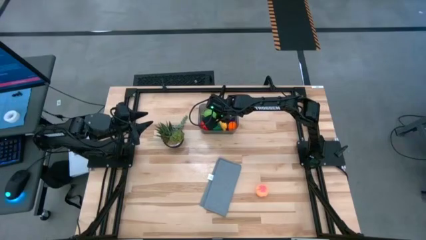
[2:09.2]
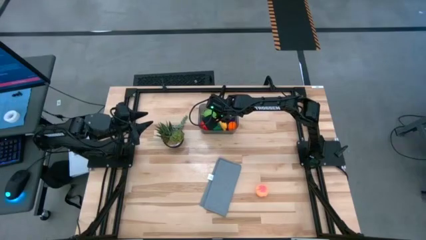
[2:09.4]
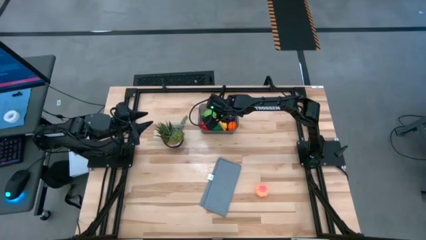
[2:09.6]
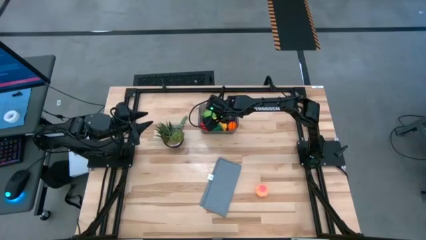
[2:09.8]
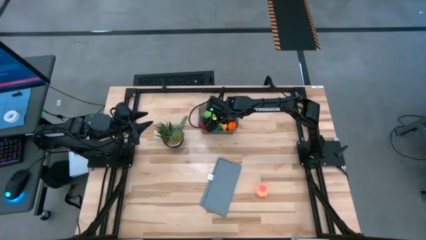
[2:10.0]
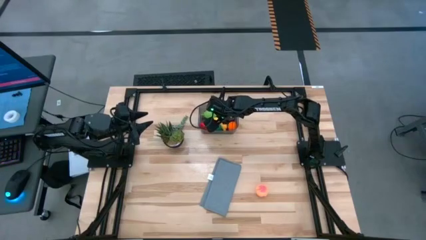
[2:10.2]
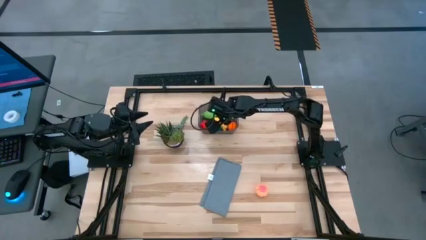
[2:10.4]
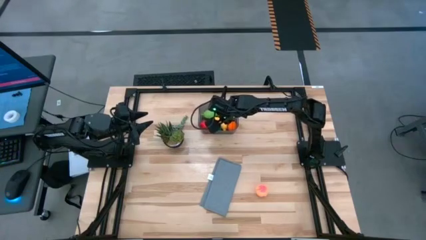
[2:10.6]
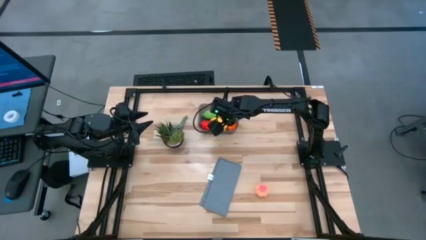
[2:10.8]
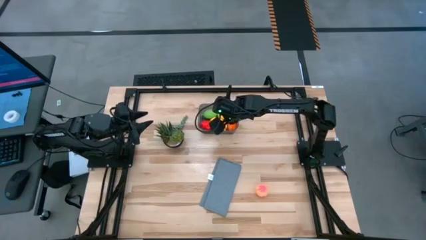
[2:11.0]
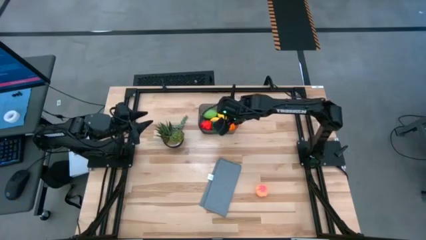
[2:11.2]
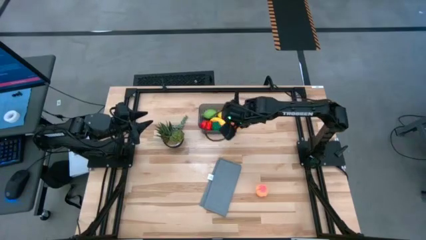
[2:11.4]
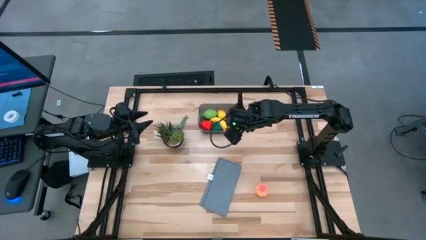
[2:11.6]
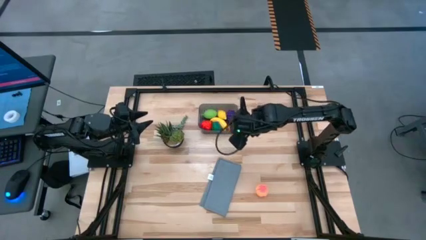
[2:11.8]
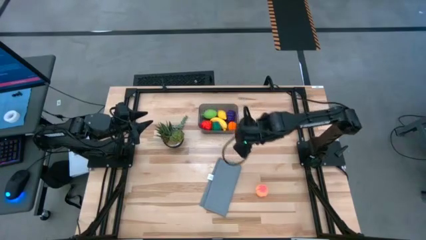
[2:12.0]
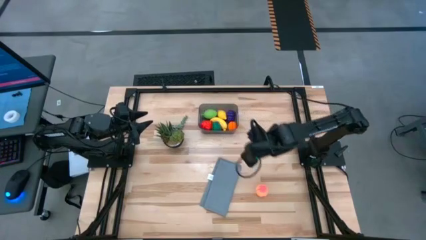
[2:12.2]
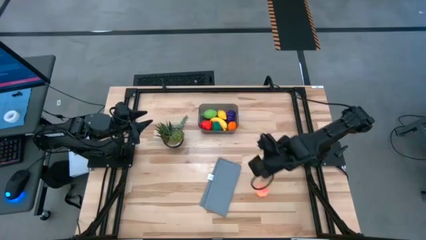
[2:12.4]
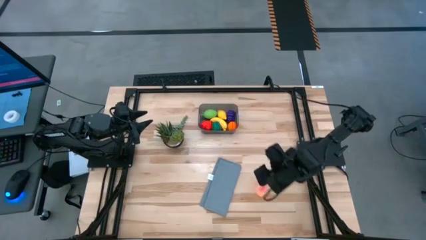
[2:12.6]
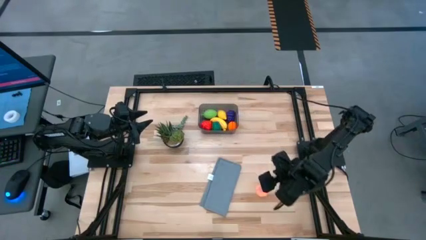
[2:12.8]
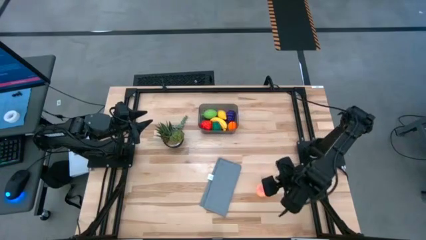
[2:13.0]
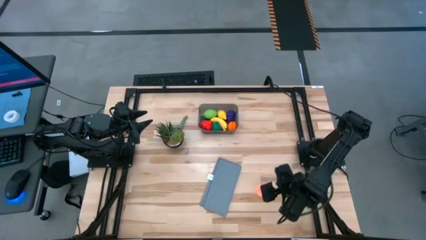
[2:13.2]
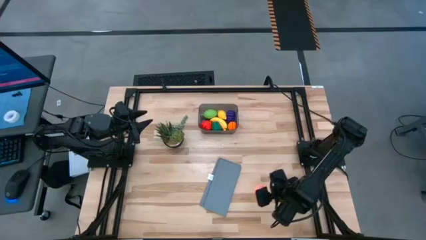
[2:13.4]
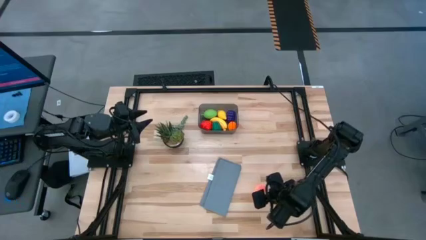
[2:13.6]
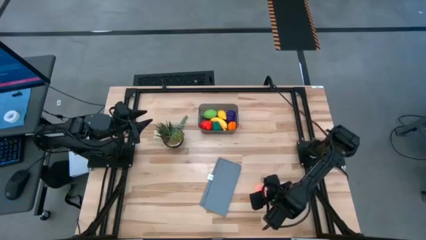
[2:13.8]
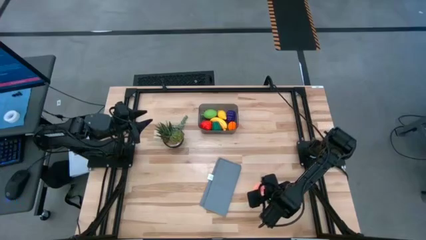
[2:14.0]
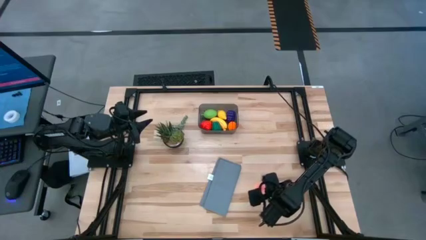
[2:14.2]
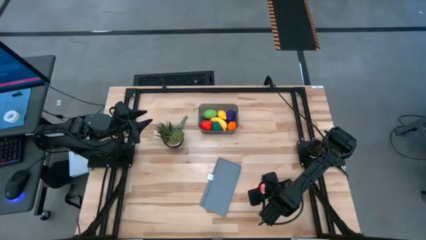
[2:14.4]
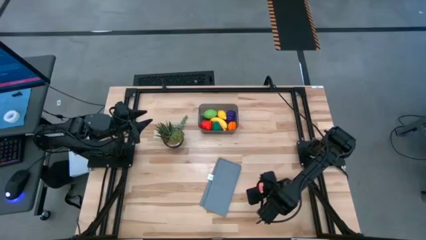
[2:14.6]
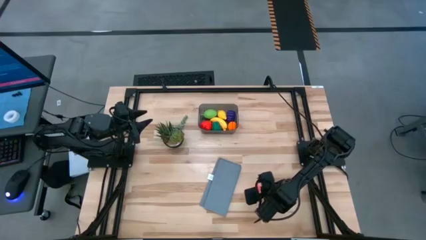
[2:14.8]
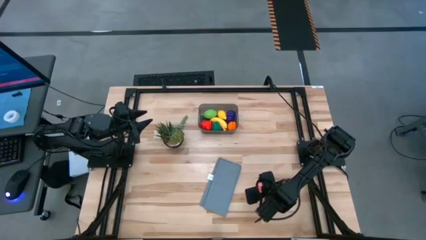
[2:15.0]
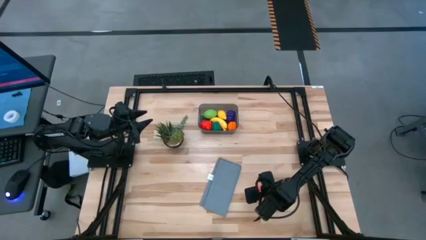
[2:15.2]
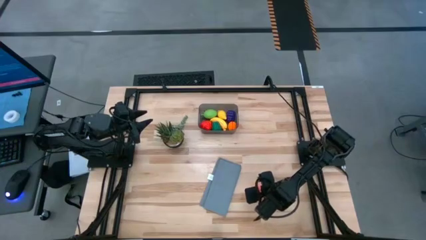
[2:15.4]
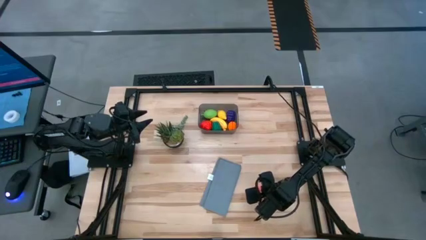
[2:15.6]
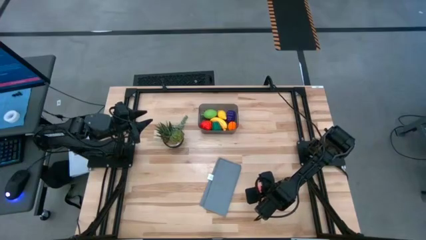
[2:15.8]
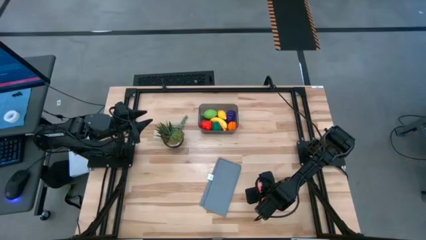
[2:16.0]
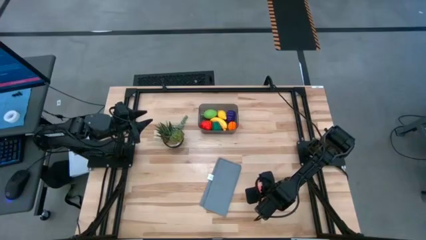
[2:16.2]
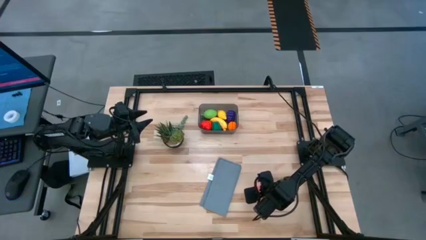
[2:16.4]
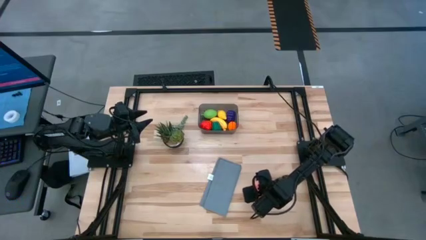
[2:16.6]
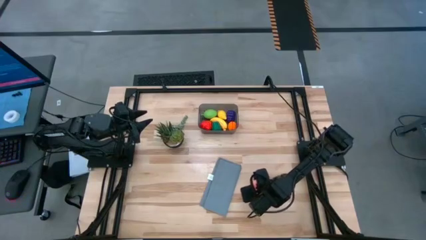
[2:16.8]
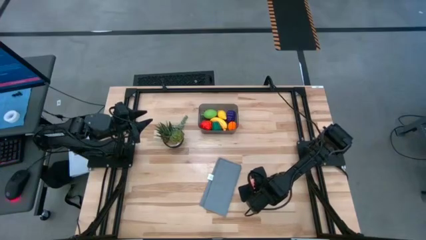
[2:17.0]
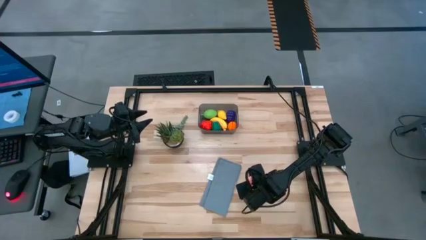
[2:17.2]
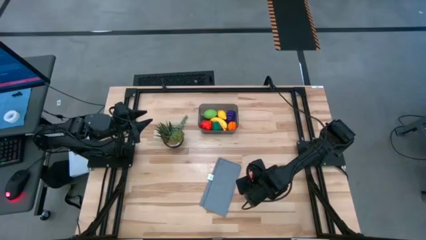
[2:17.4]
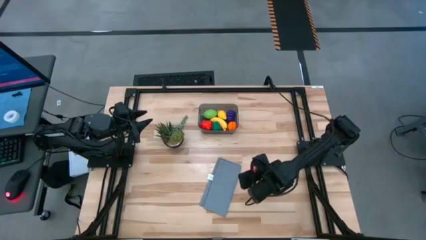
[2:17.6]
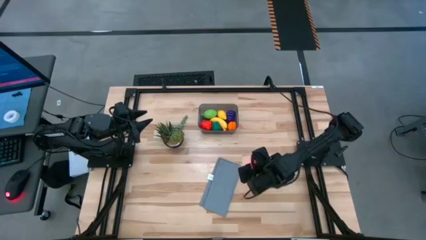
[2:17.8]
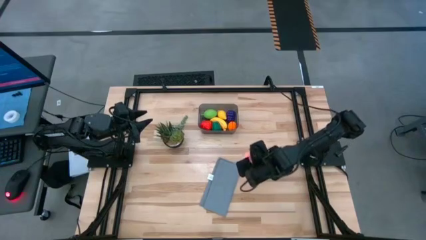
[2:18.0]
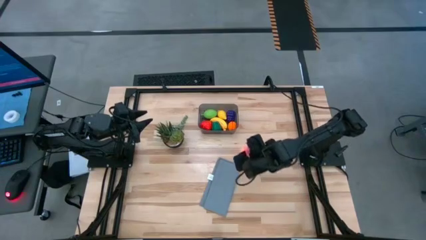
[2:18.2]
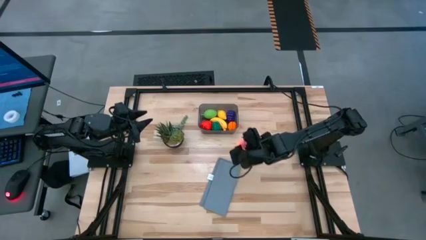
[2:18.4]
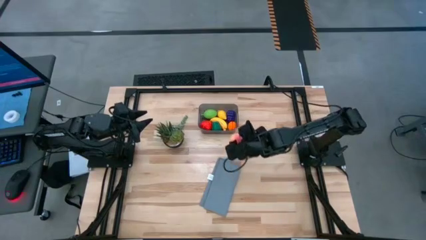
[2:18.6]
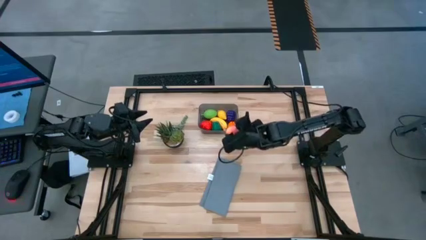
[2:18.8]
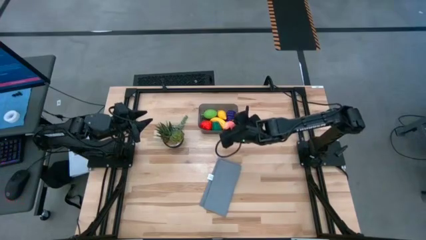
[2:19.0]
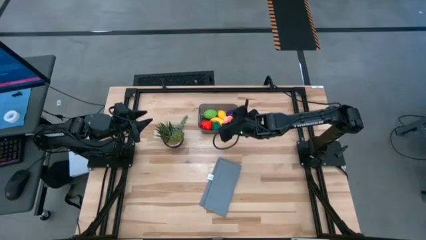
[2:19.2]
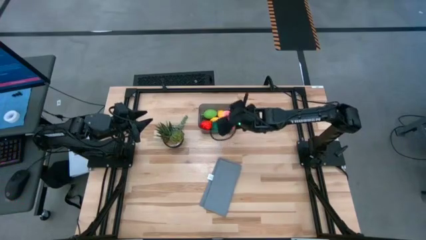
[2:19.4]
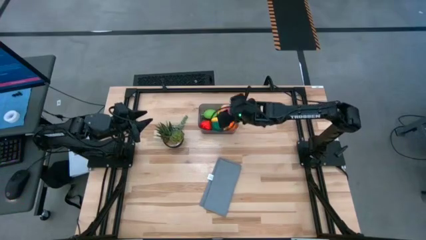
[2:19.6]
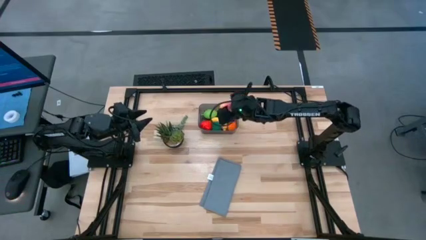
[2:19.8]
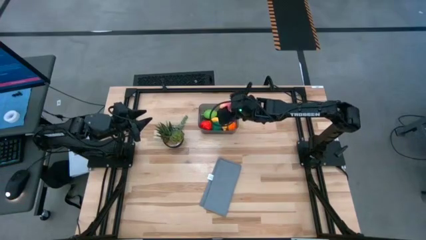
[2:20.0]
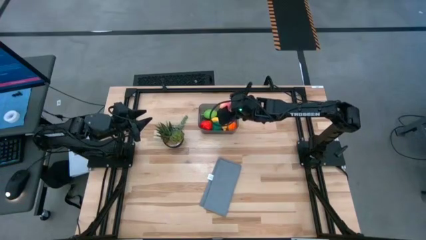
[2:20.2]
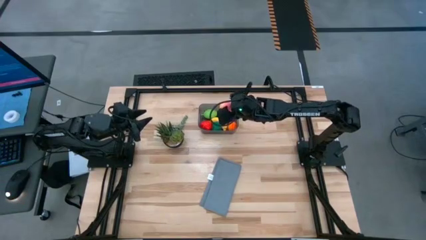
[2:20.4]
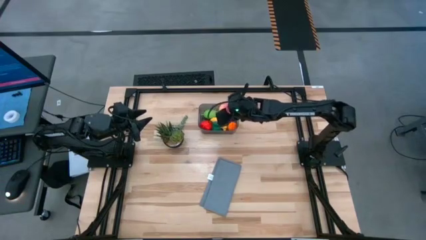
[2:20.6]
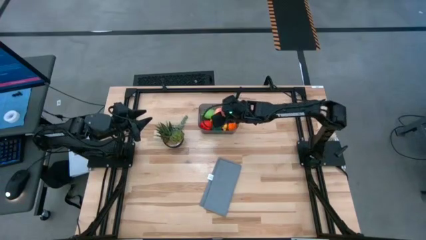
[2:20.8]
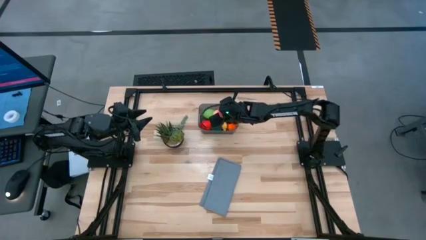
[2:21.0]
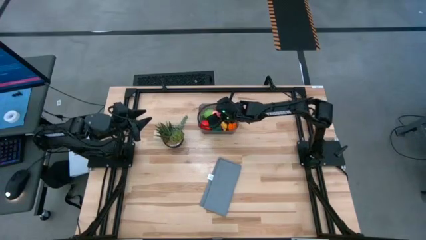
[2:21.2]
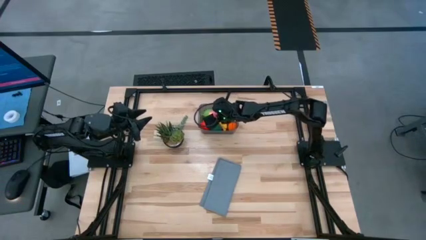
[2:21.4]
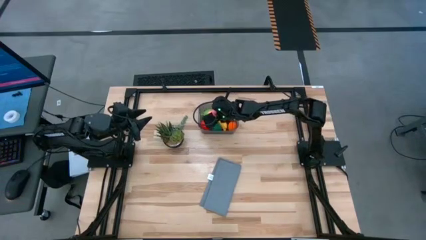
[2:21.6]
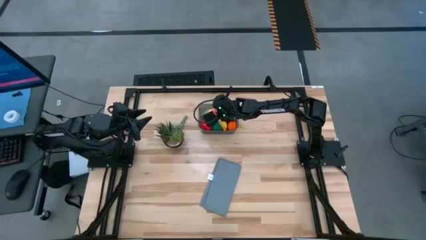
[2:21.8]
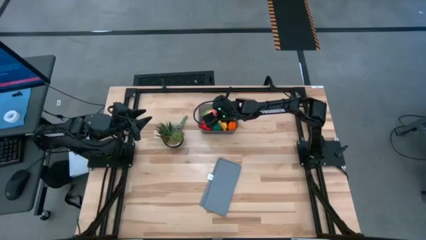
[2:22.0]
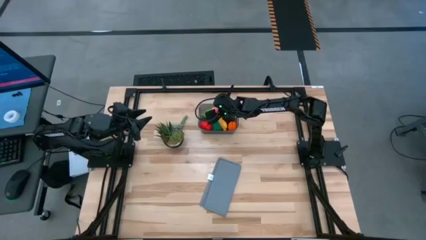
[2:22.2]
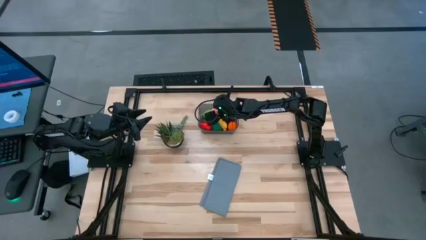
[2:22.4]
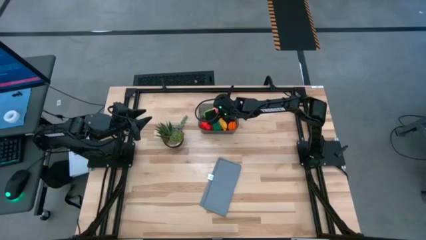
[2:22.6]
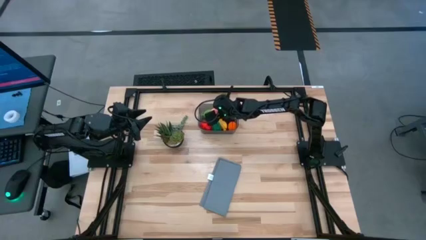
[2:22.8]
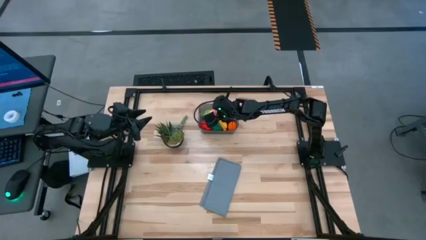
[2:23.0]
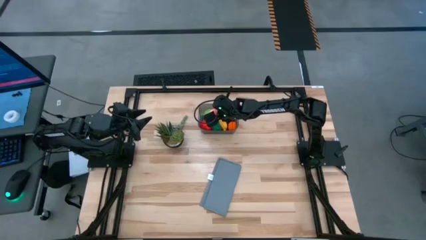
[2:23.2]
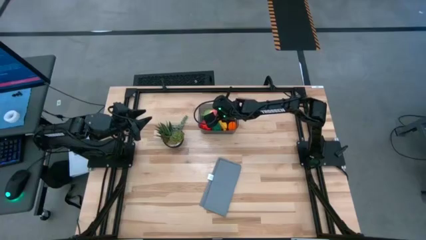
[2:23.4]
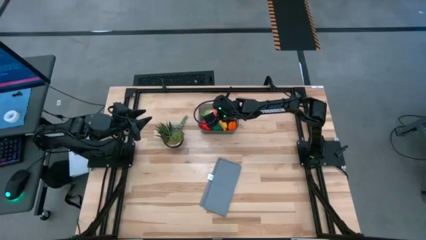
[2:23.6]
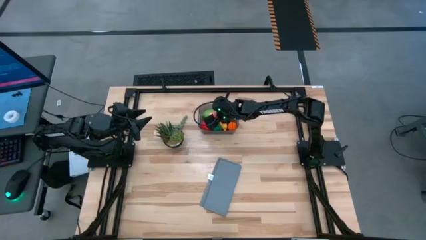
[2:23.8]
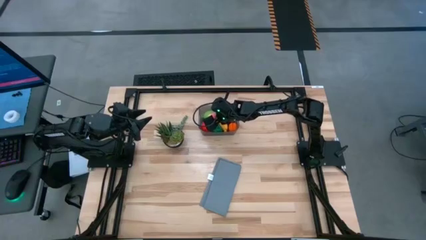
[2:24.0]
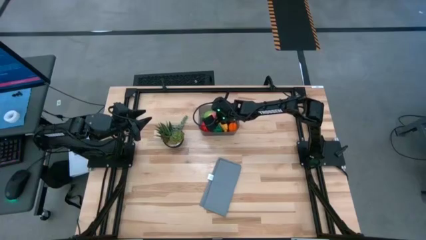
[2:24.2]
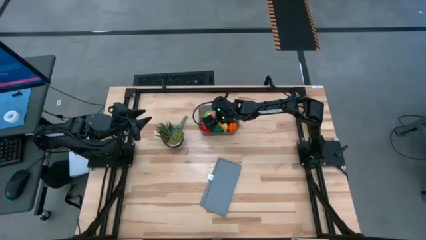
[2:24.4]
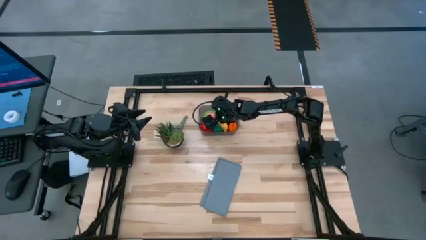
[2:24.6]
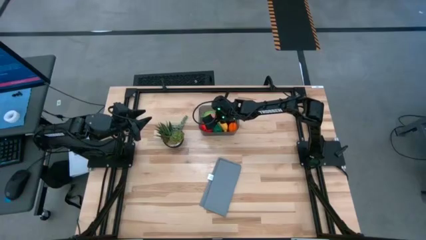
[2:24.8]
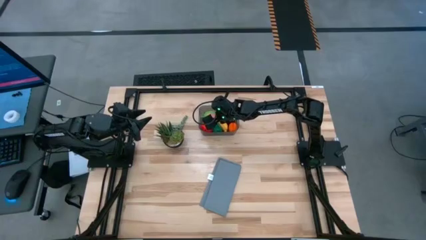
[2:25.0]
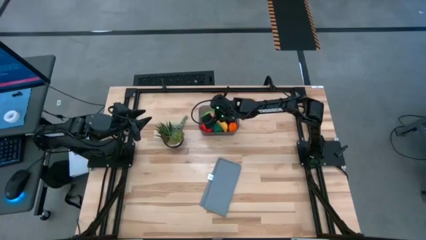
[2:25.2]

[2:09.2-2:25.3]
Task: Pick and placing Produce into tupperware
Put the peach into the black bin

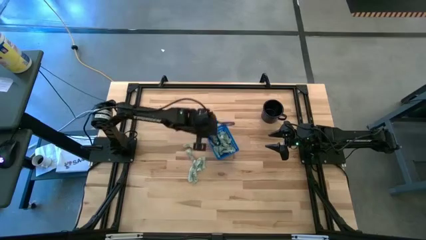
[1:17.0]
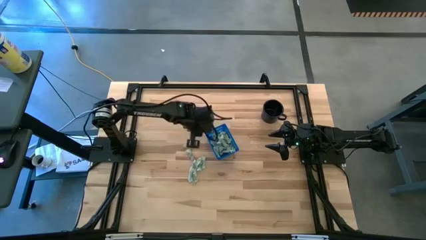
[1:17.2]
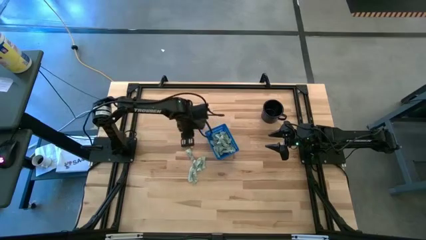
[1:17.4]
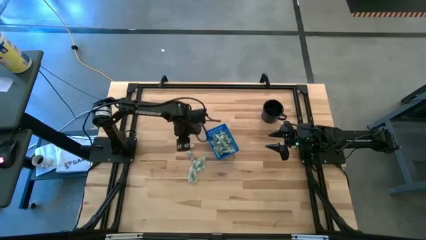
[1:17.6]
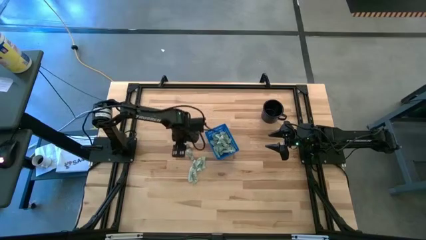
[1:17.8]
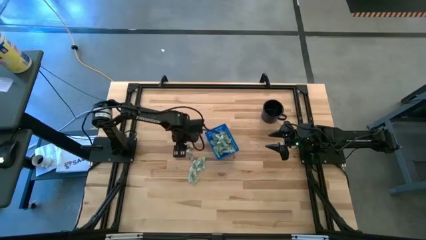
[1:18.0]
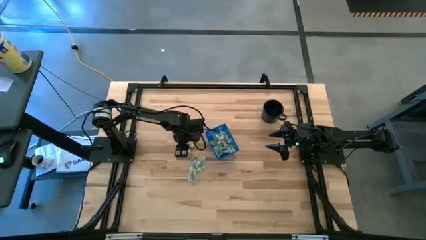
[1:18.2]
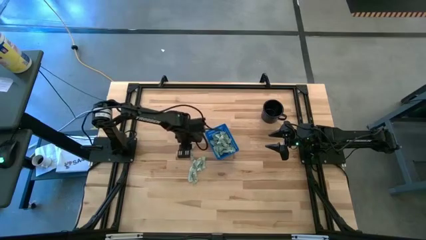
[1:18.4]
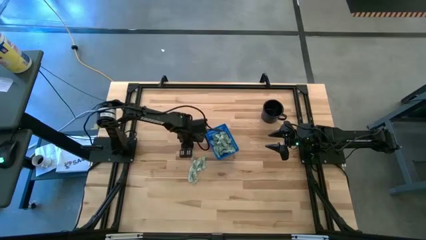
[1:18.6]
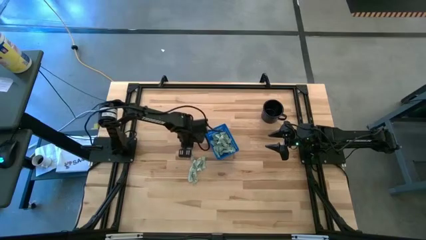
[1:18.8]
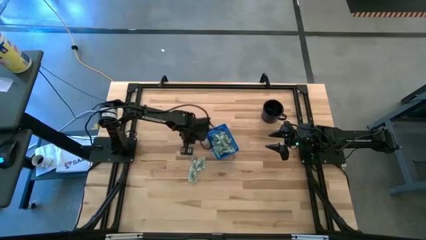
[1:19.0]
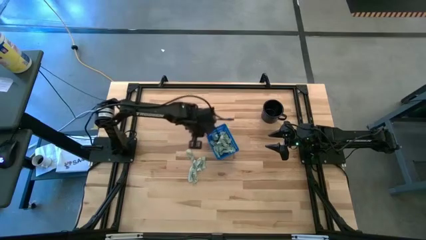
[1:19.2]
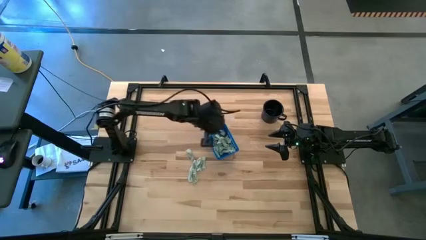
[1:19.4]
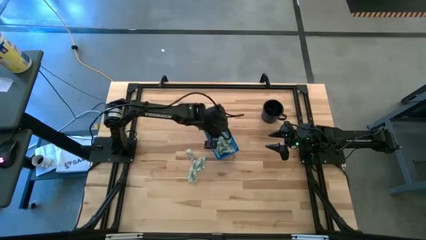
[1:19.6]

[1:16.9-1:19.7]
Task: Pick and place Stevia / Truvia into bins
Put the stevia packet into the basket
